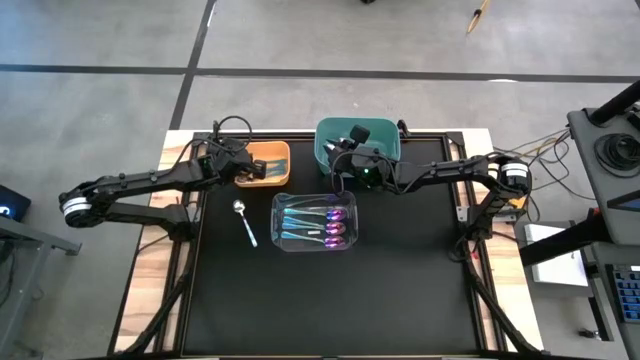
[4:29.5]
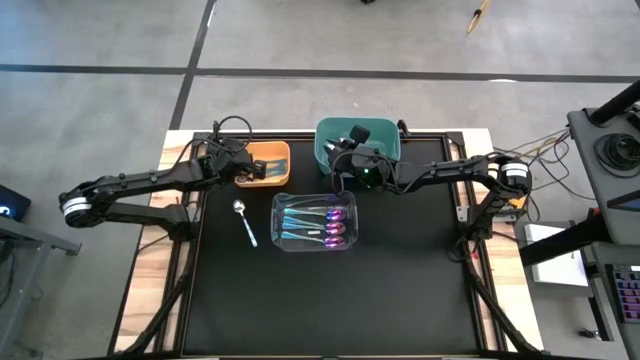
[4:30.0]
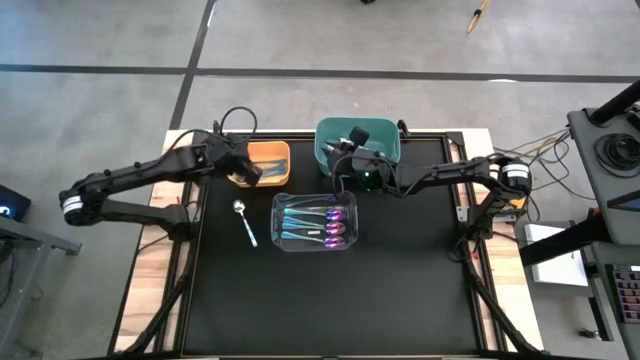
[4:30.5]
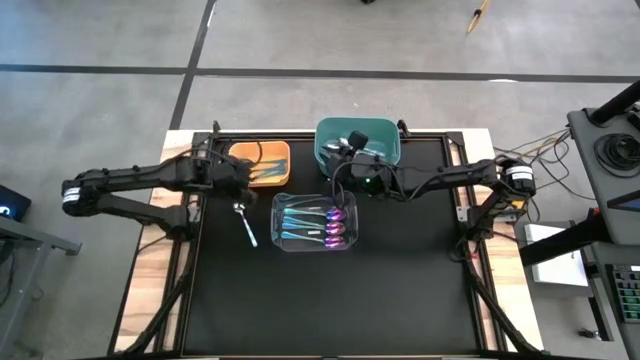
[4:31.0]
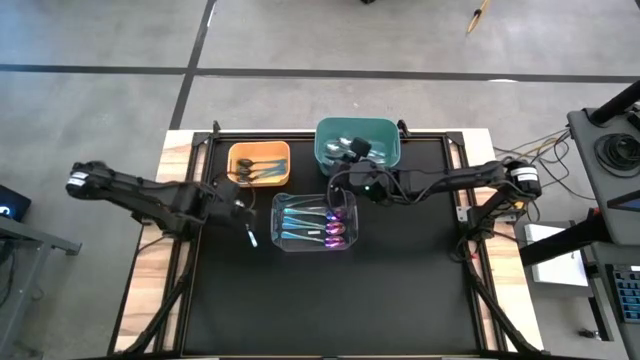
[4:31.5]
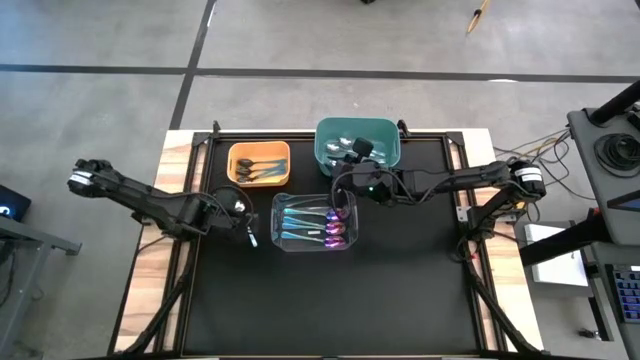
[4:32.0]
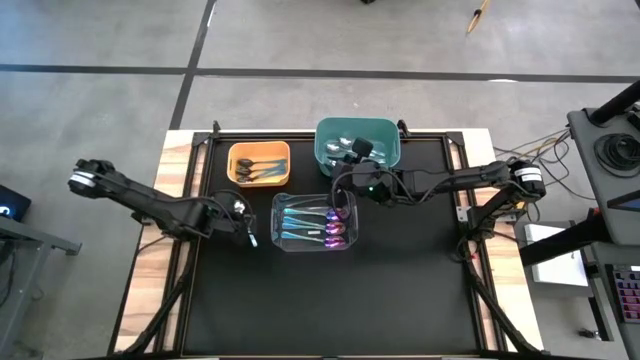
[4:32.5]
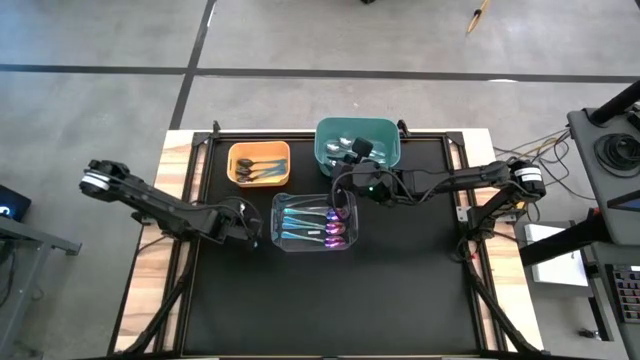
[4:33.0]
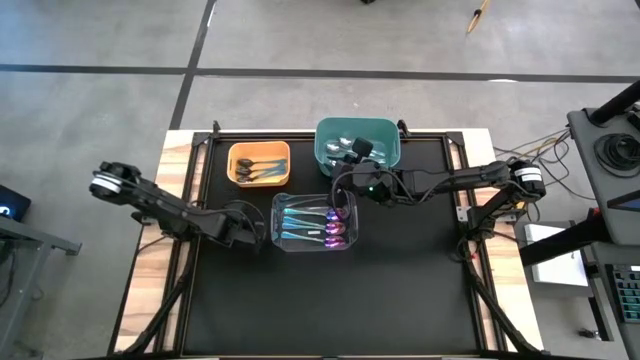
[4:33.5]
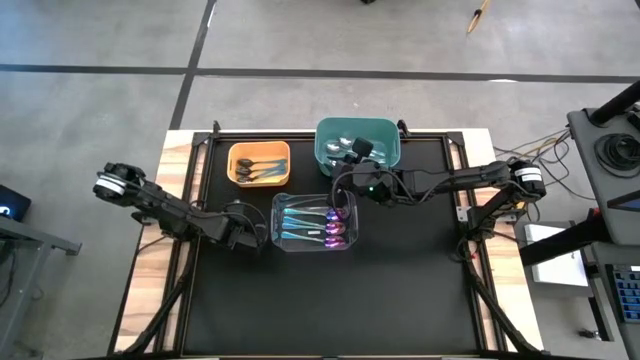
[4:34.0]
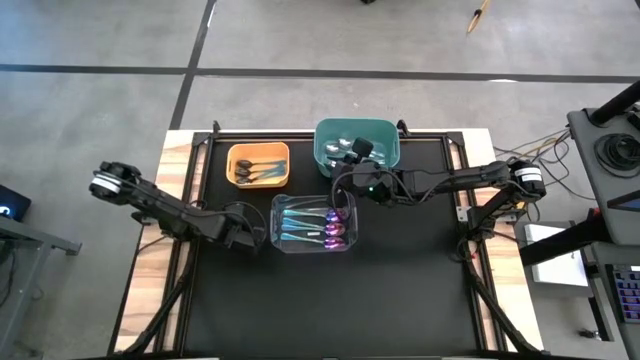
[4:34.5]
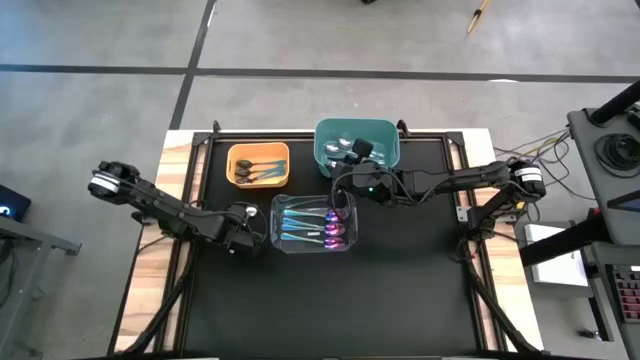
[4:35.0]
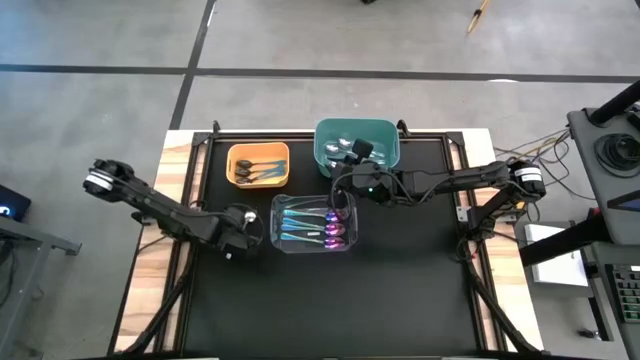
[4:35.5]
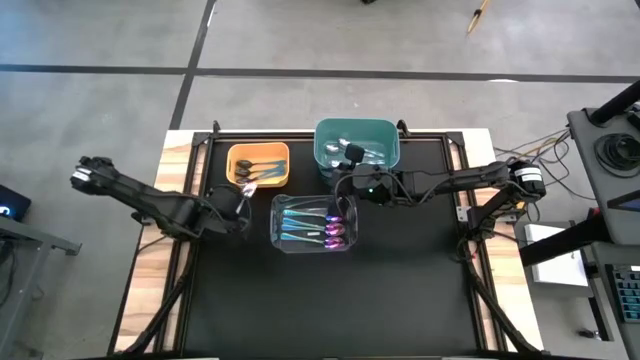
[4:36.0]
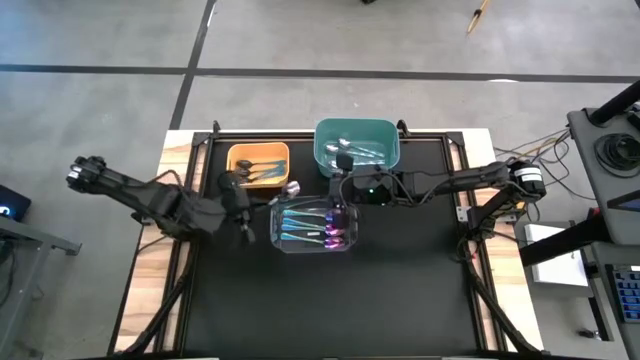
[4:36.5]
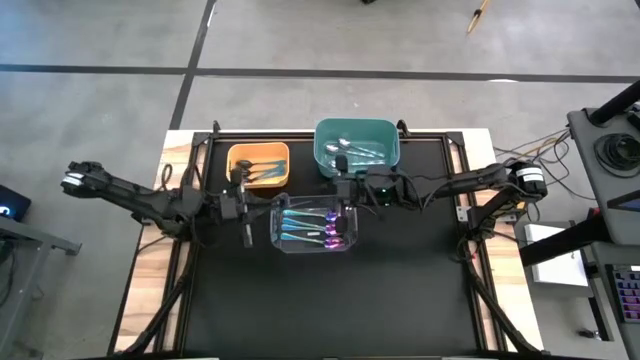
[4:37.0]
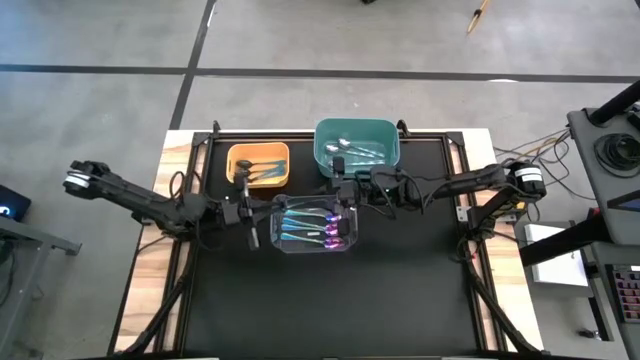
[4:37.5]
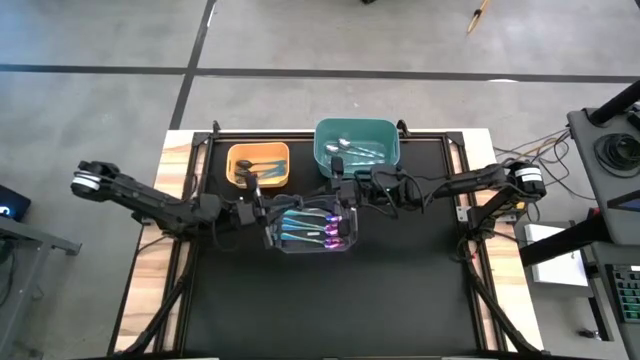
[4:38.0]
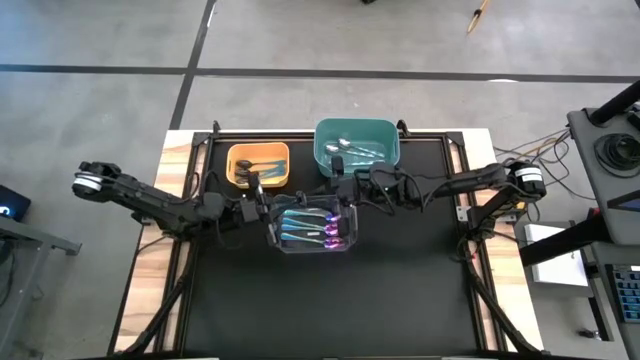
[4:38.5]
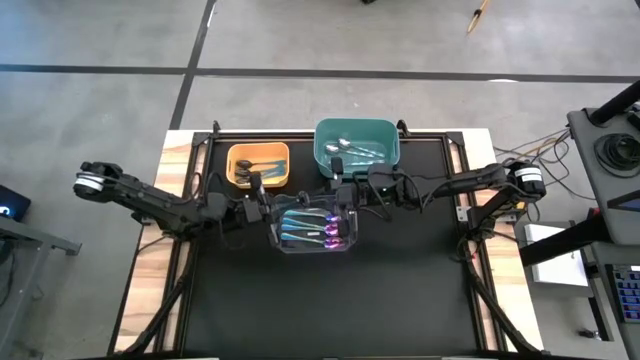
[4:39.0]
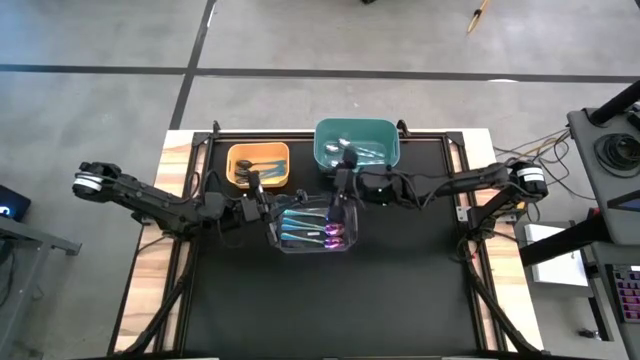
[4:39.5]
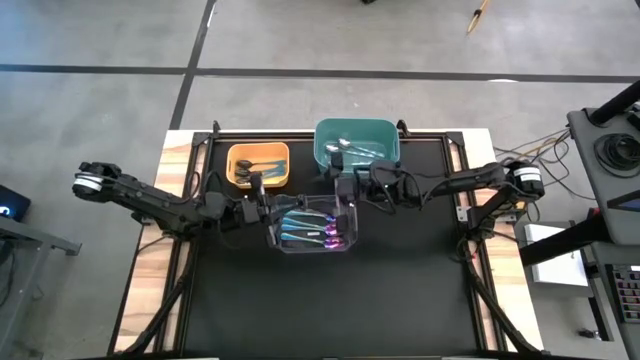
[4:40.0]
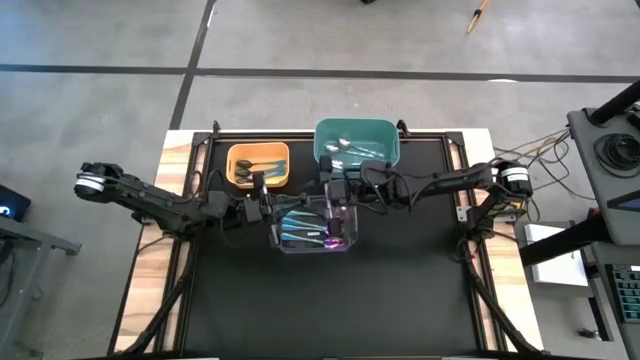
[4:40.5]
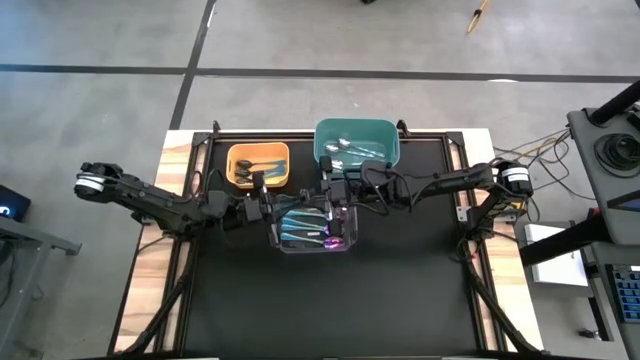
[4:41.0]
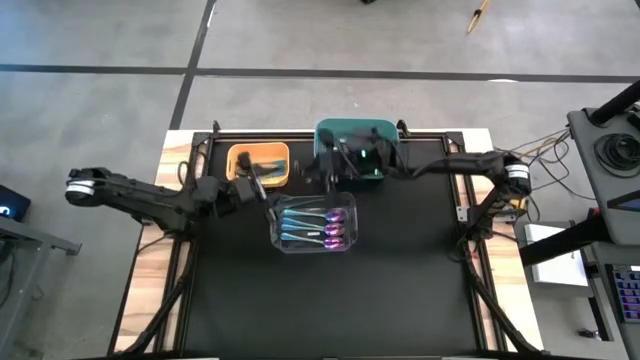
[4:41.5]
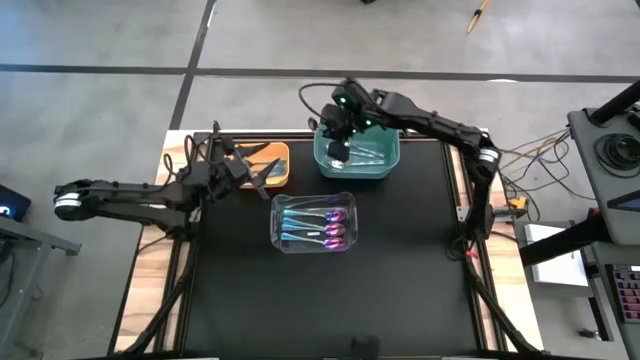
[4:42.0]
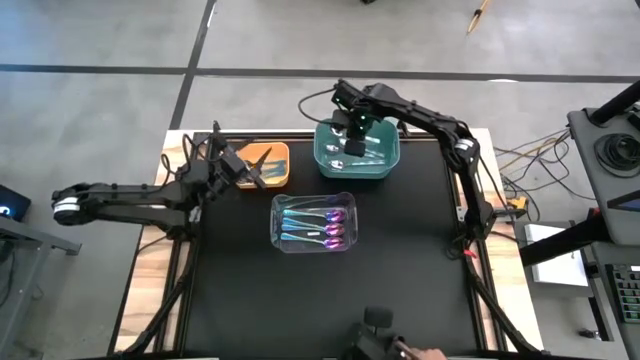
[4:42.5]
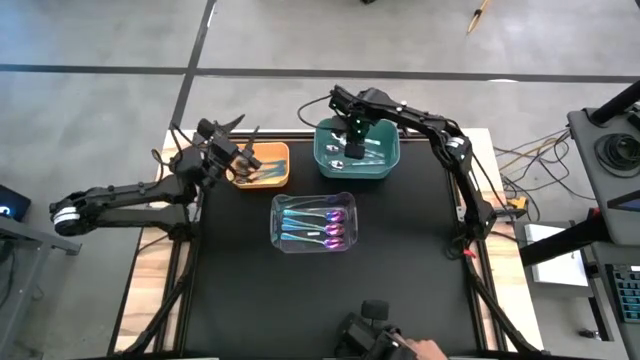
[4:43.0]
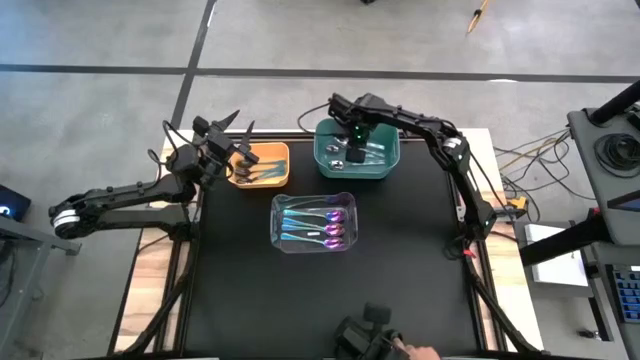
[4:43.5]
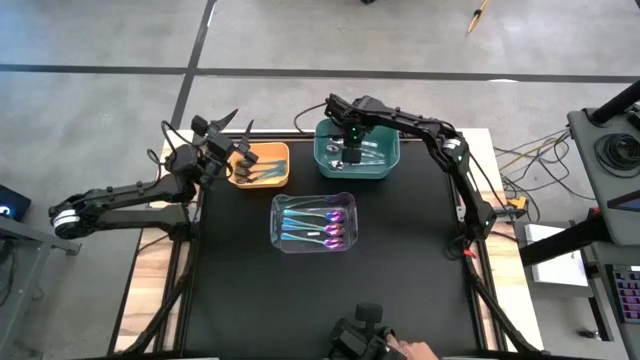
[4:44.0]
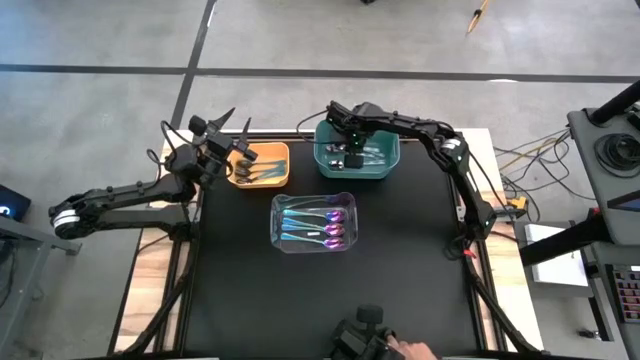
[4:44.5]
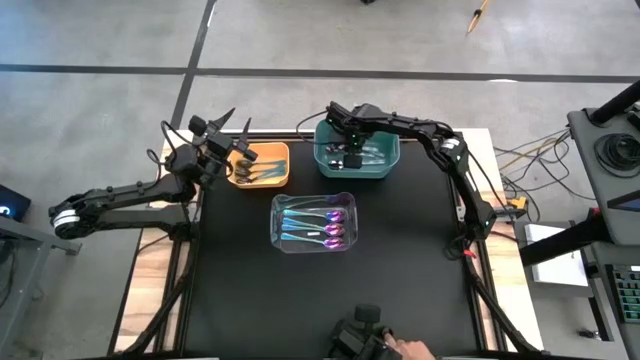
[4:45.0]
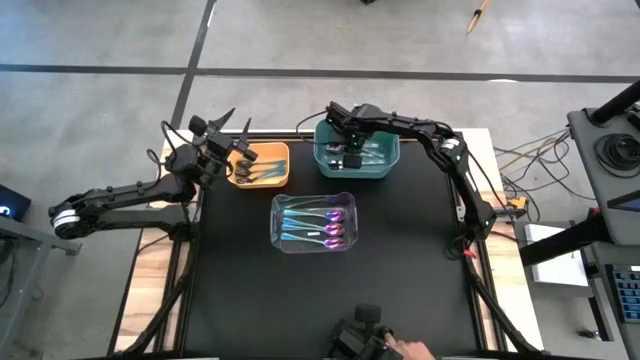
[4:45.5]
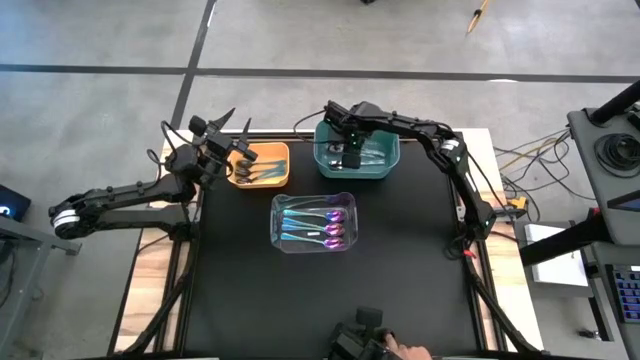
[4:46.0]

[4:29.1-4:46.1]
Task: Sort silverware by color (type)
Put the blue patterned spoon into the green bin

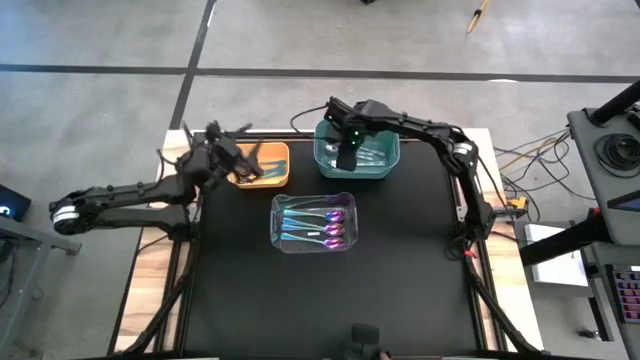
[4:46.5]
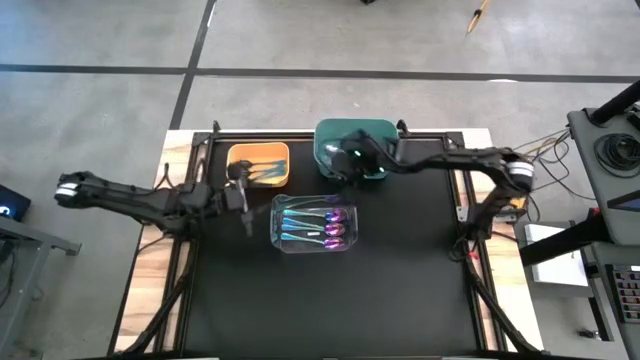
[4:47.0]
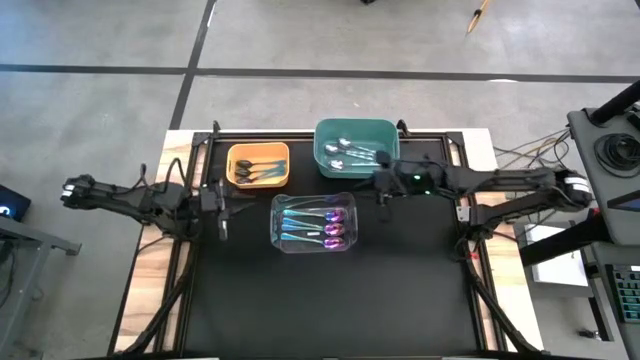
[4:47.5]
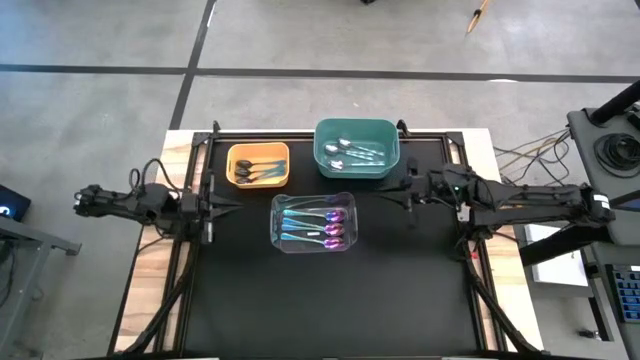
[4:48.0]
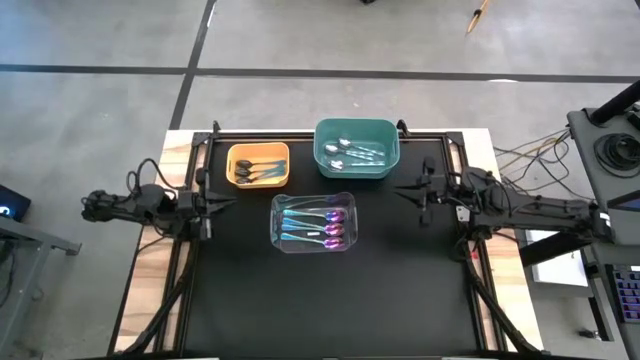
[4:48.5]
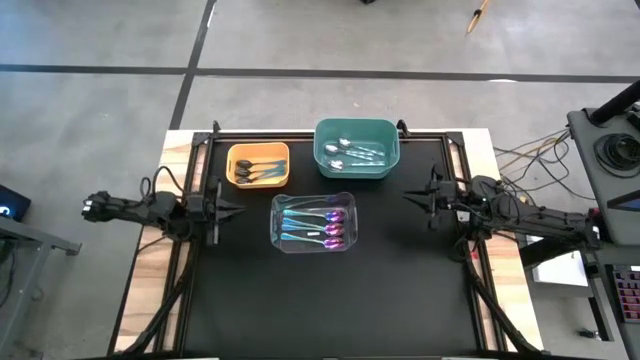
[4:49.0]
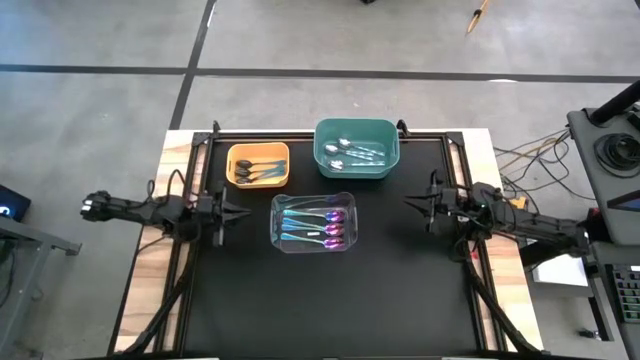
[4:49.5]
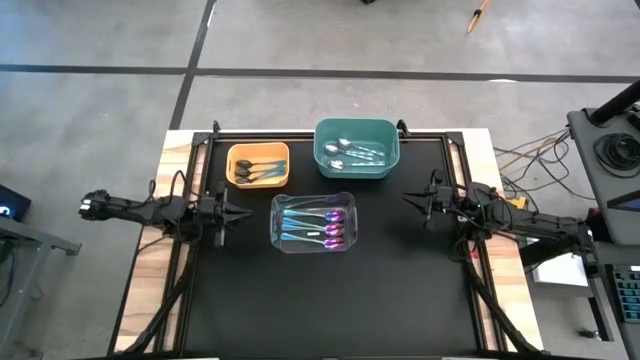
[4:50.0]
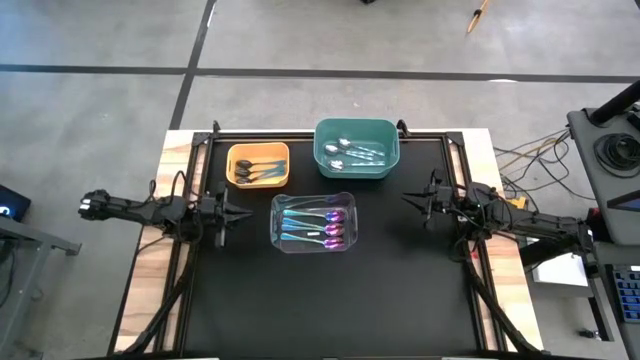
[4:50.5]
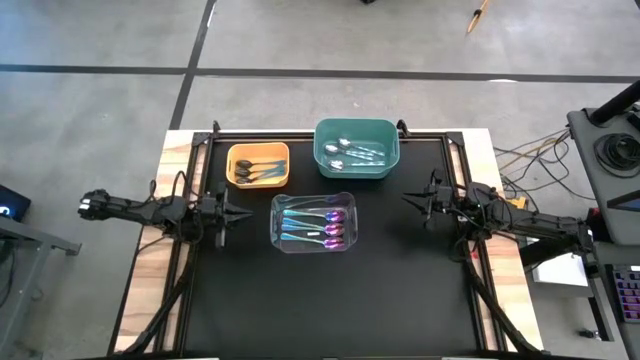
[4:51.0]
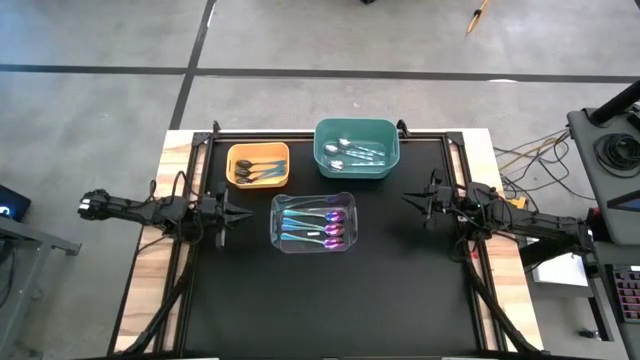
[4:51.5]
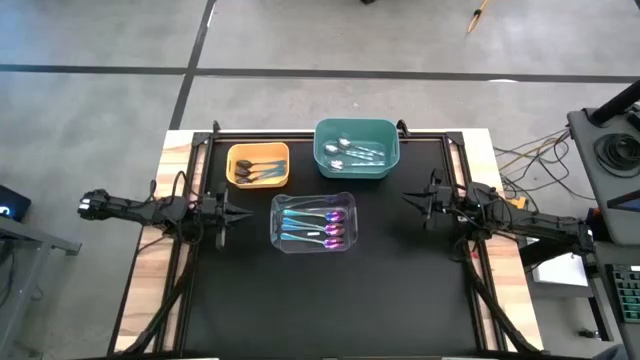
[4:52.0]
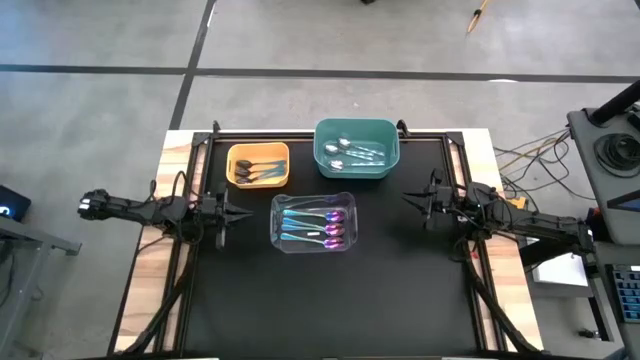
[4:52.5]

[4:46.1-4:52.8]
Return to Home Position
